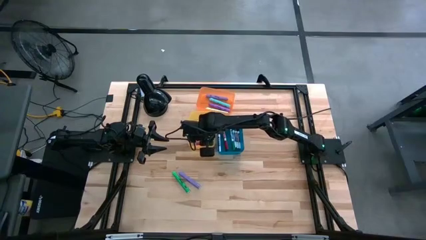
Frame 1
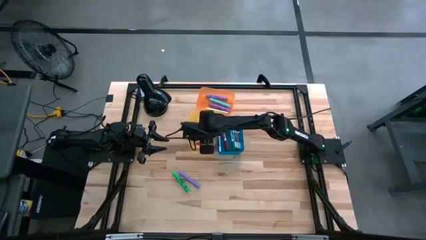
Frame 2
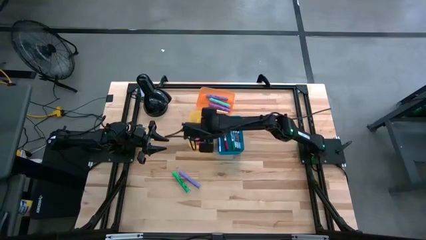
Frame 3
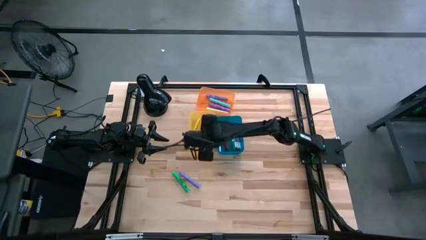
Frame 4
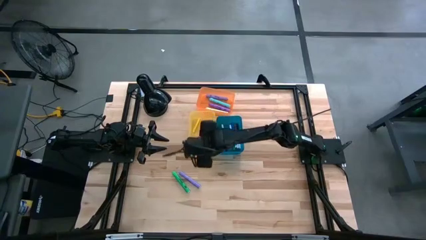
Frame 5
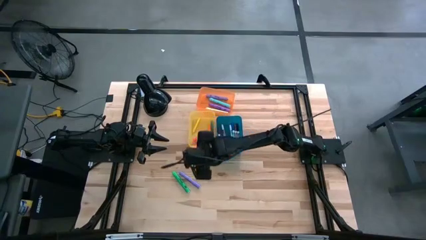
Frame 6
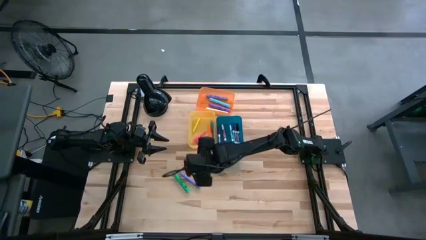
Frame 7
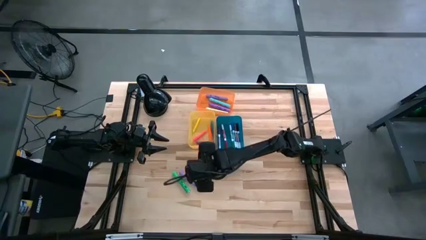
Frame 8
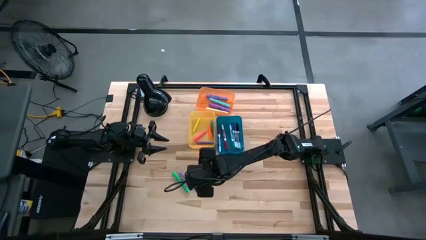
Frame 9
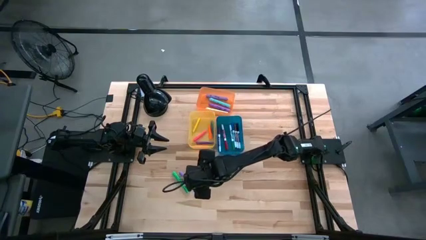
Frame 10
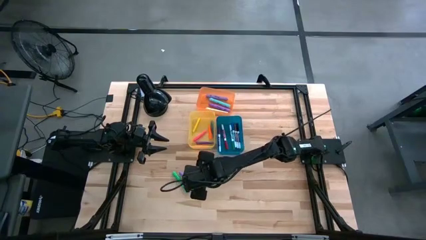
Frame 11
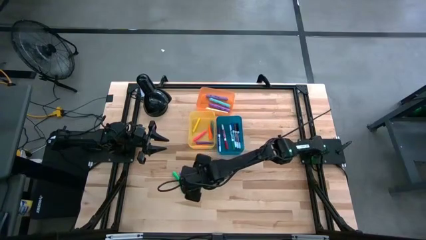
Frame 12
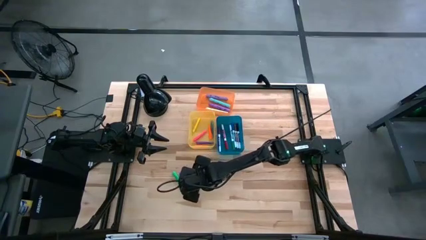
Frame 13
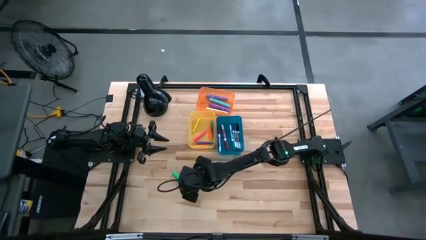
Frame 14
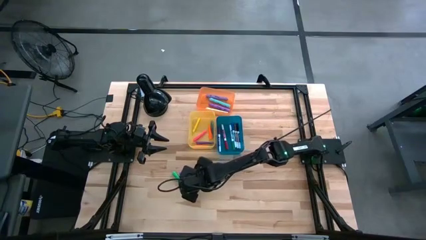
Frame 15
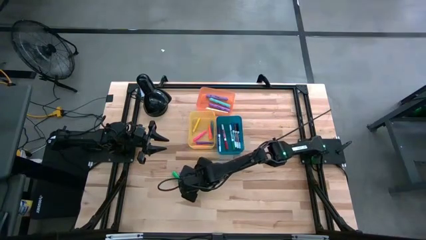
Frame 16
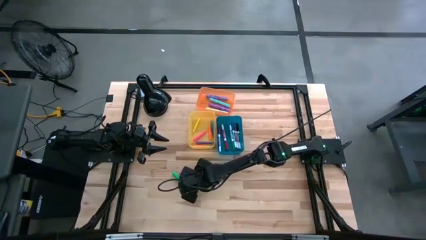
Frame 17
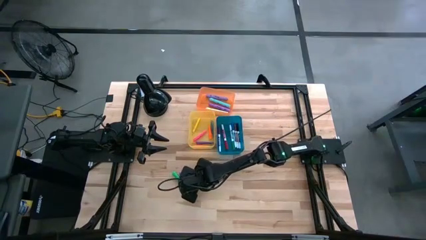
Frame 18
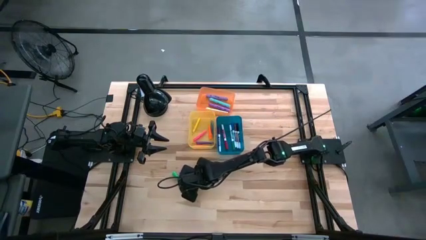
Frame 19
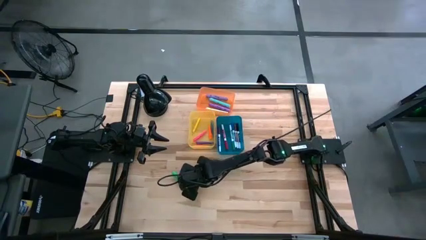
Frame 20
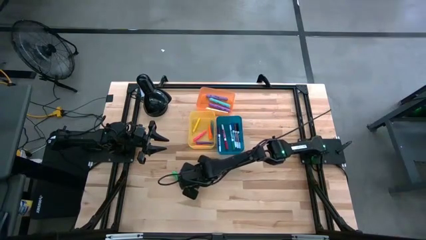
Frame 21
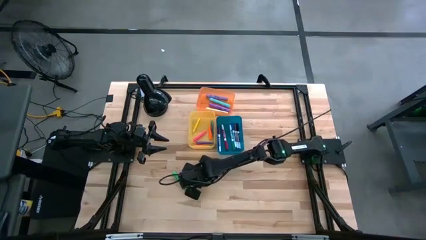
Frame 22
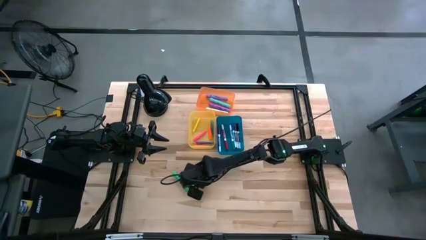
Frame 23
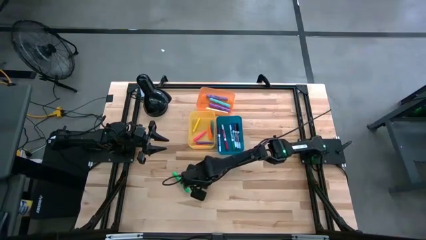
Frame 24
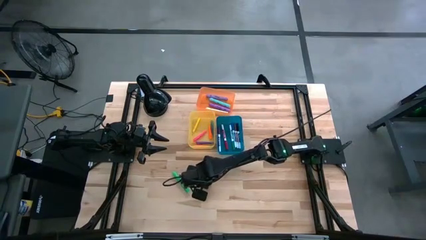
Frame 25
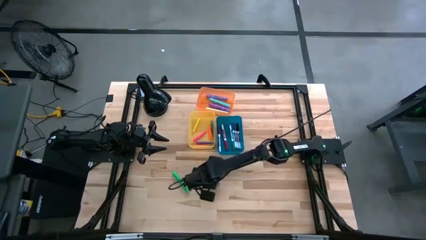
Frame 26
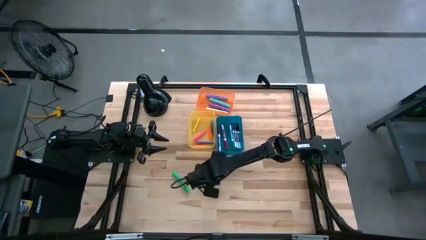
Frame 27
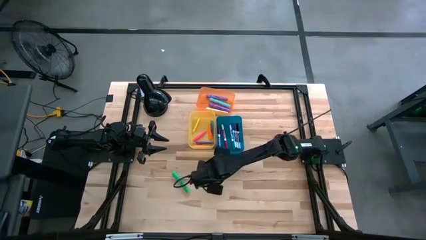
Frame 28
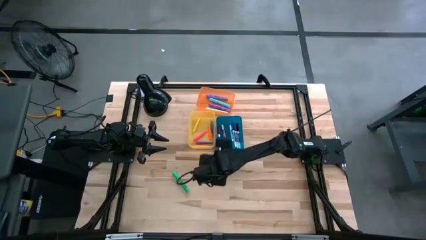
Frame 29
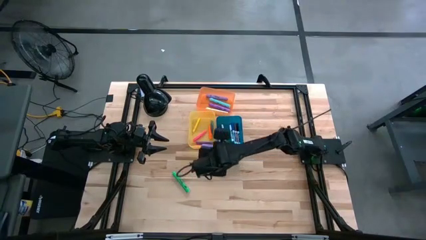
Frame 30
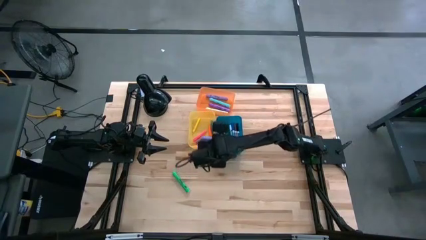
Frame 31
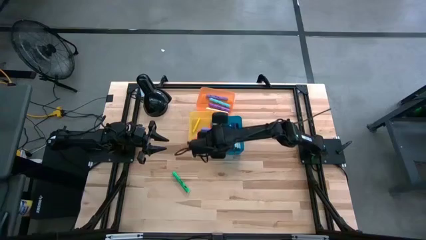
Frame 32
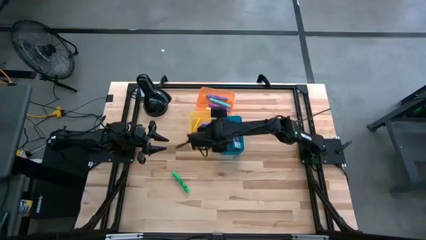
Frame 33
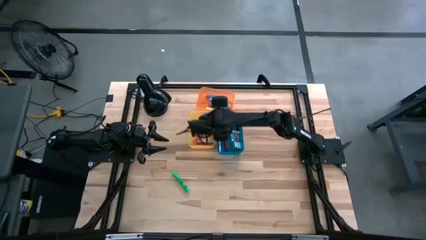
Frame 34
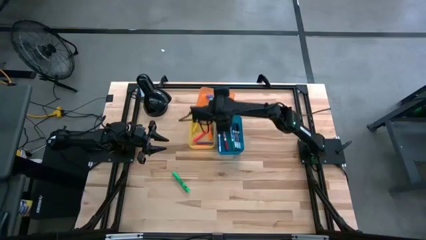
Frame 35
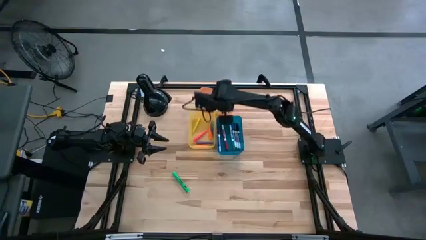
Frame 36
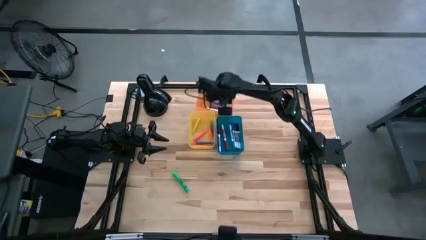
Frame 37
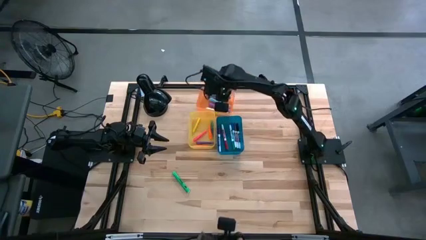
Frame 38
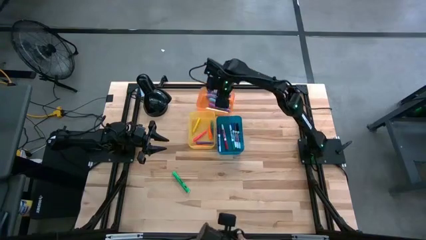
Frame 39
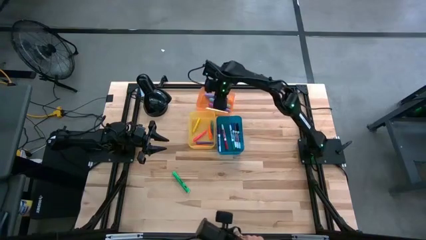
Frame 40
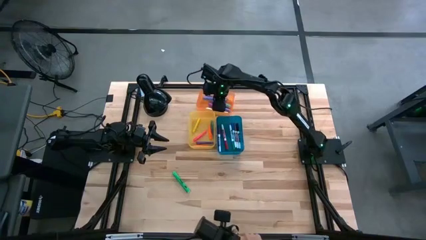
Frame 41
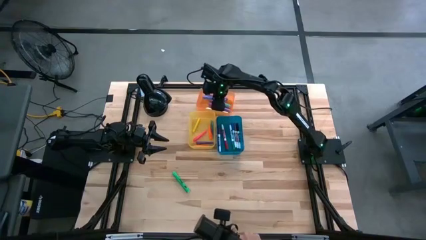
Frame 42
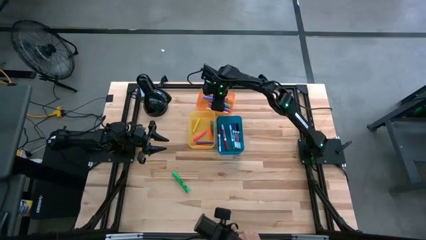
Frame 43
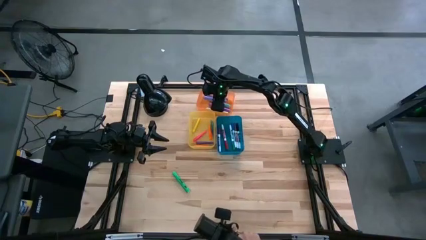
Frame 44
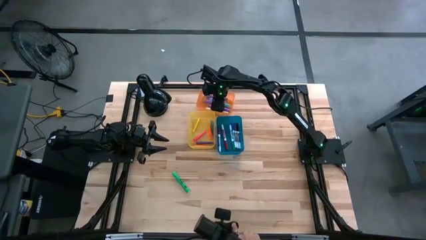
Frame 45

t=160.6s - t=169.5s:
Task: Pick & Place Markers
Put the purple highlighter pen into the orange bin

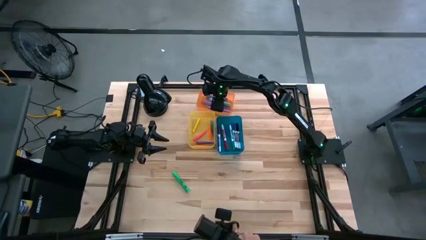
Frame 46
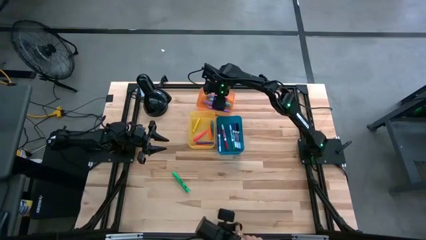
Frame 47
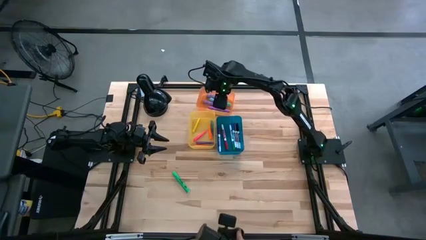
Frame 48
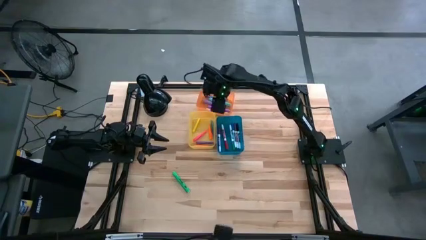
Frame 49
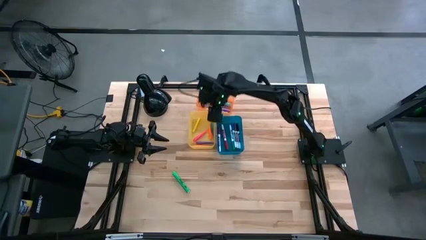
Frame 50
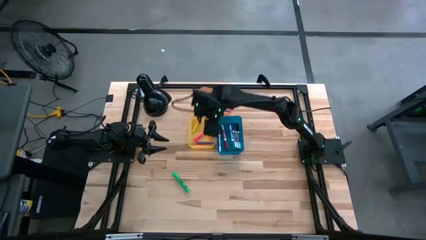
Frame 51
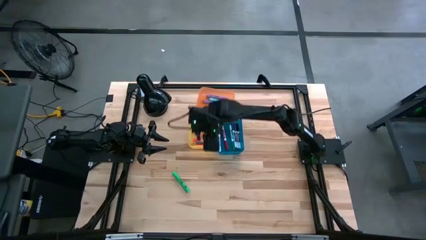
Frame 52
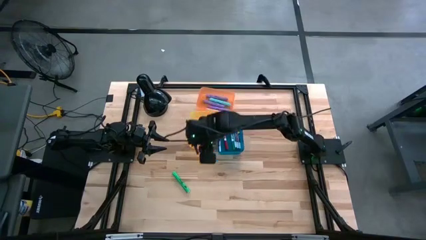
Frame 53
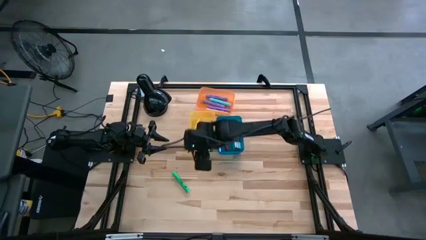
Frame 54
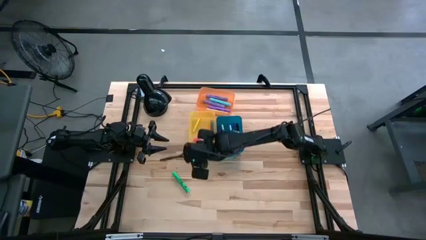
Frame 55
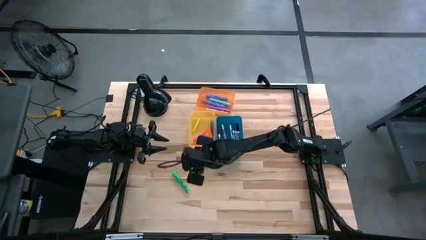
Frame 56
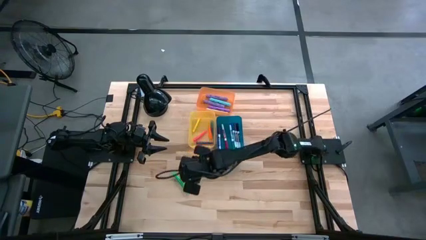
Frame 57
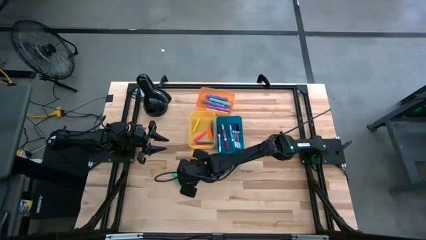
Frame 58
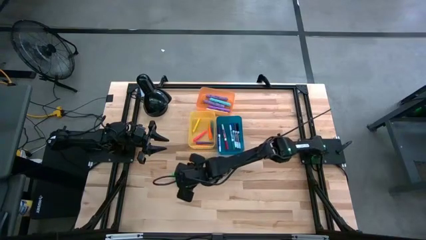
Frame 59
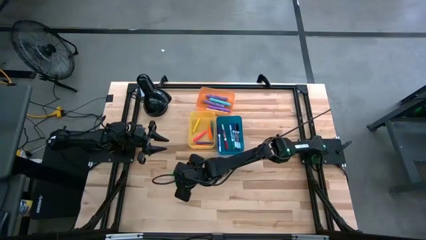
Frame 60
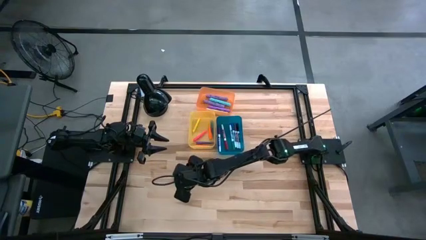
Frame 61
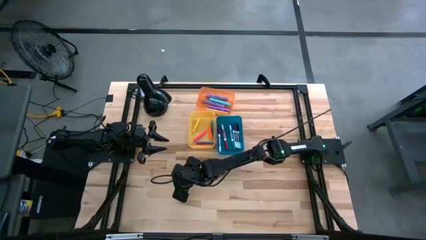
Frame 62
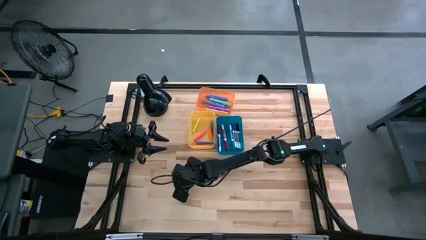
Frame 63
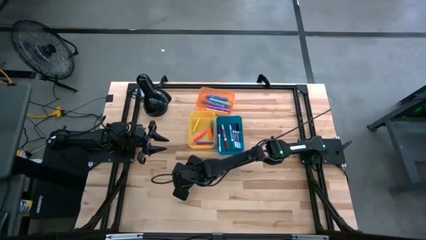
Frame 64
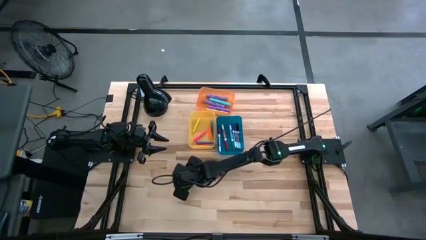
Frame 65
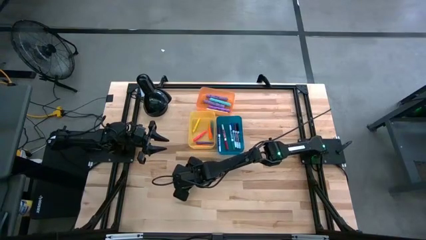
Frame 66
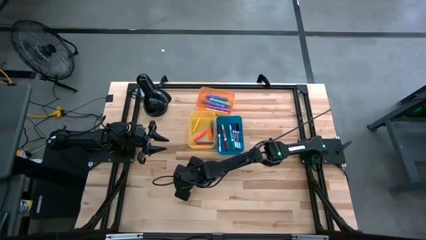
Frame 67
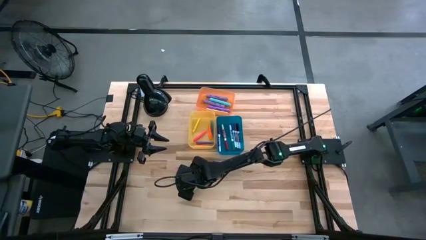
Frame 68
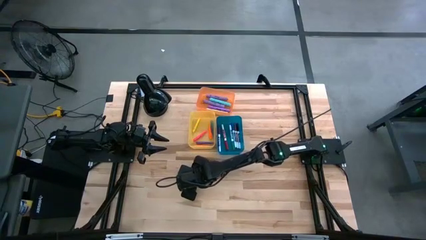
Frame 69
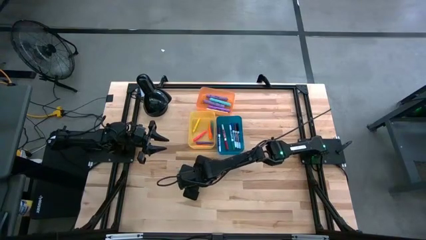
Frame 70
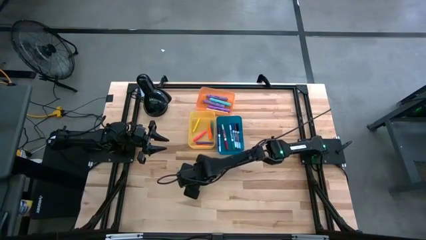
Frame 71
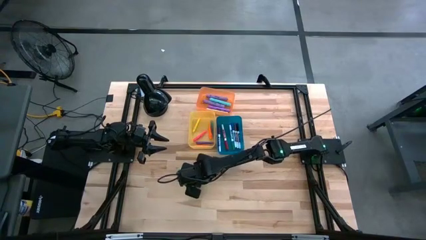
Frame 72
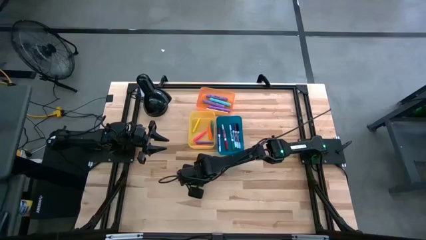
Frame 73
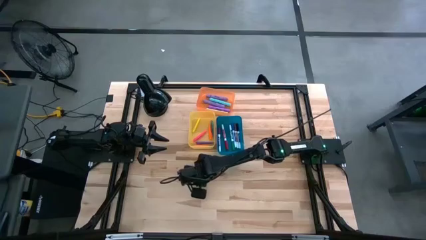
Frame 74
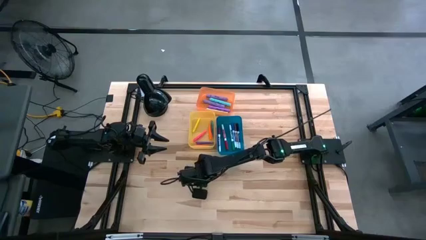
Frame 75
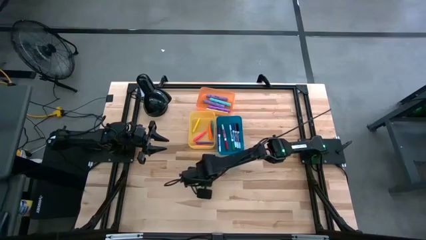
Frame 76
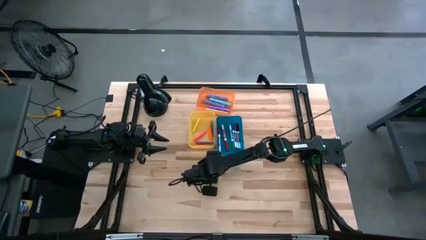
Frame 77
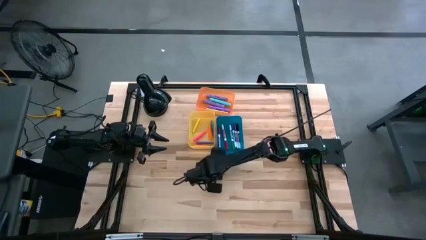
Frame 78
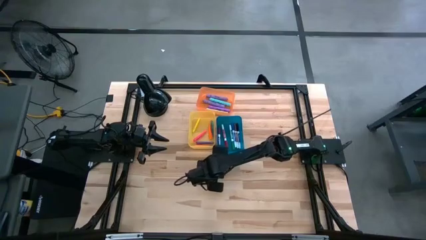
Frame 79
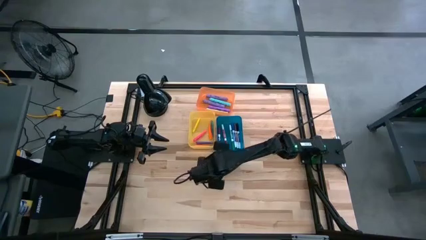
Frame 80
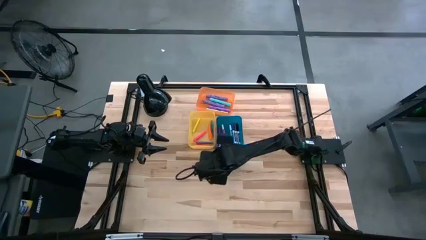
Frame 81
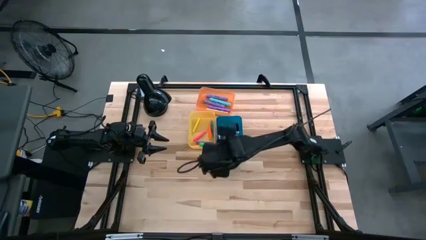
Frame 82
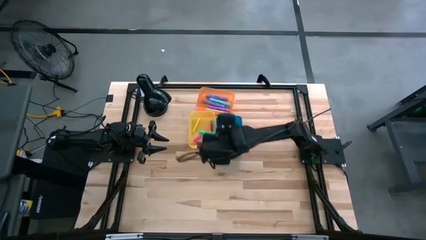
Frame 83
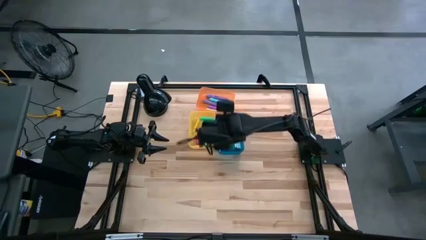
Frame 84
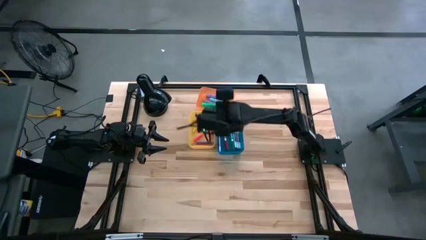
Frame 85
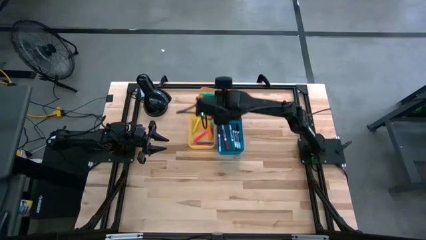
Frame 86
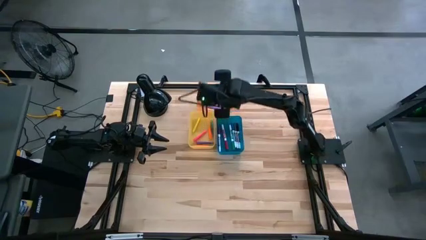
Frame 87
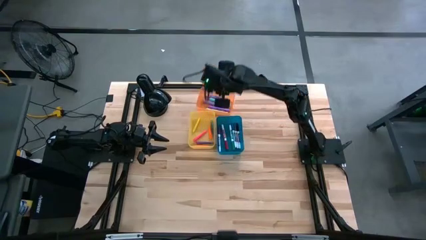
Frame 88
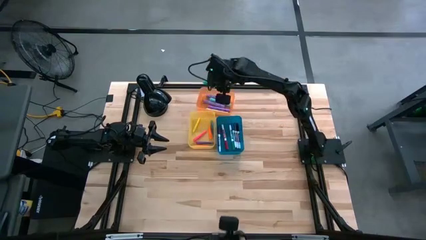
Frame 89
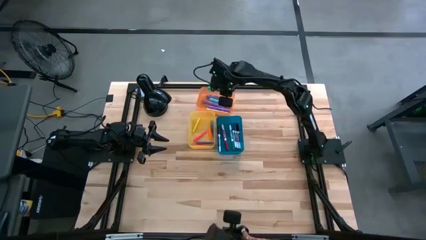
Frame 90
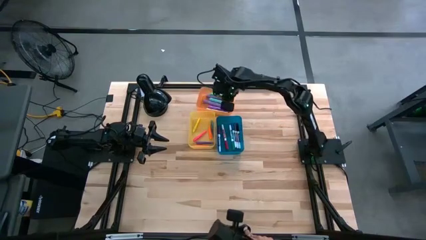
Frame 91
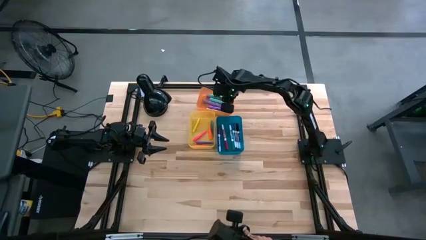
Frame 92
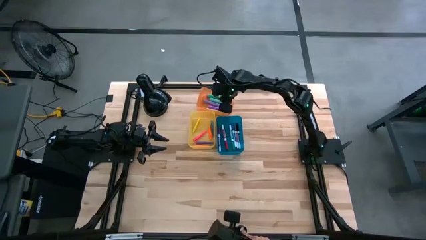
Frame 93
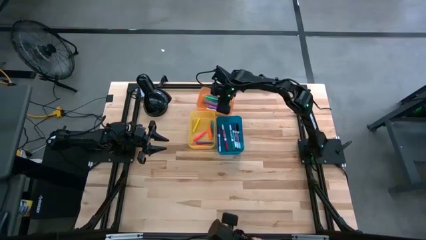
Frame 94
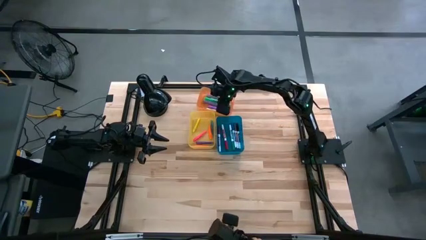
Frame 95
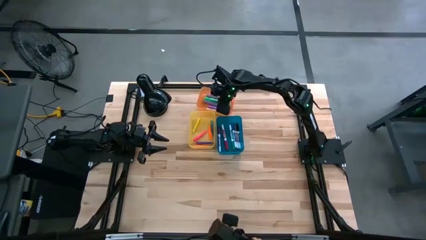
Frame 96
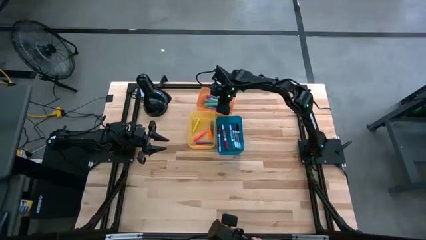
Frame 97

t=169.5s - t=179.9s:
Put the green highlighter pen into the orange bin
